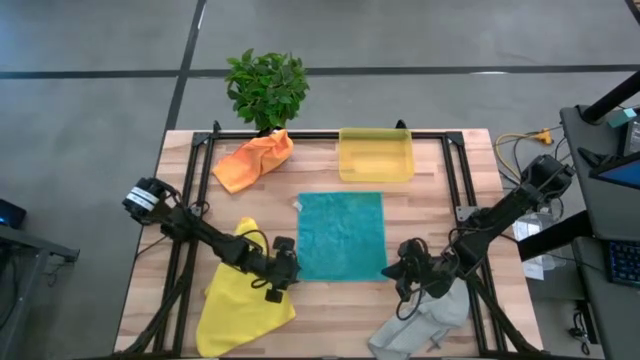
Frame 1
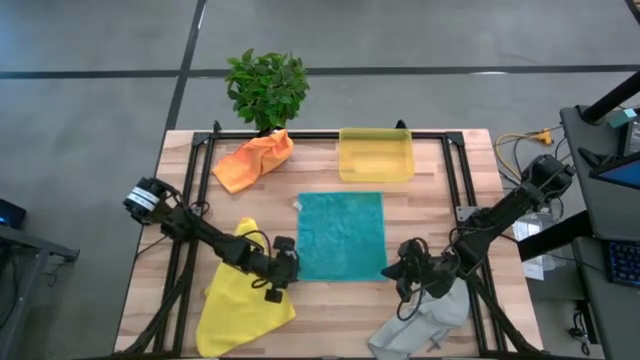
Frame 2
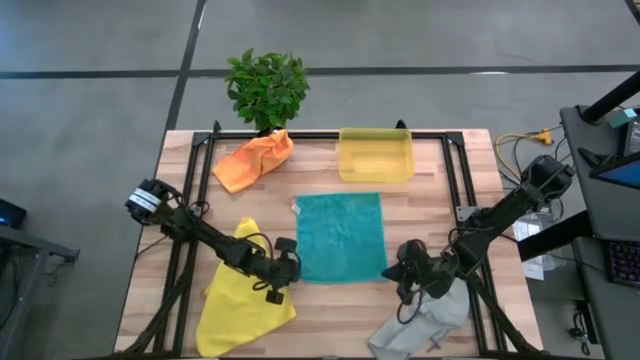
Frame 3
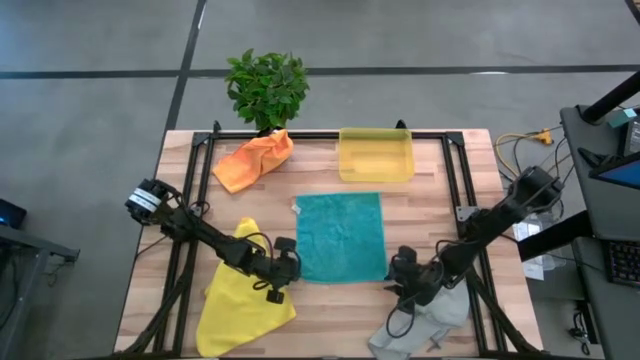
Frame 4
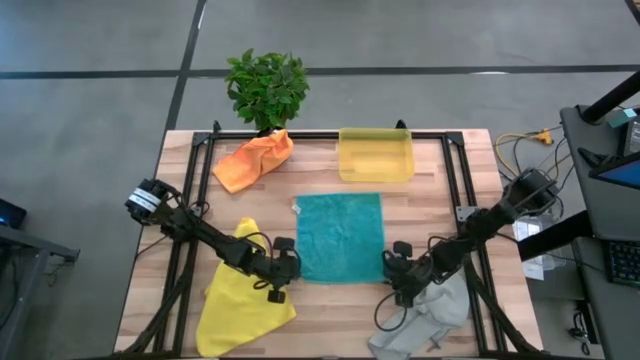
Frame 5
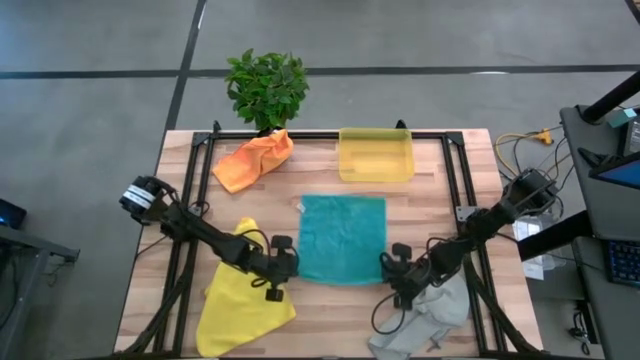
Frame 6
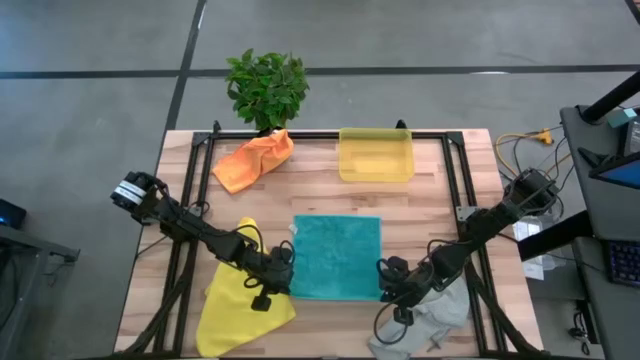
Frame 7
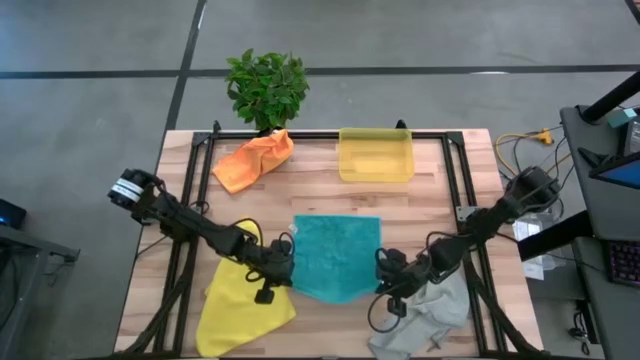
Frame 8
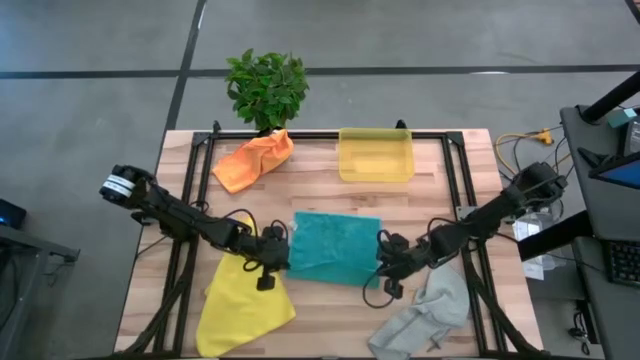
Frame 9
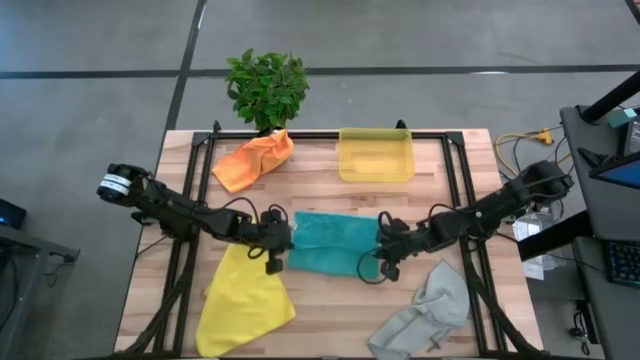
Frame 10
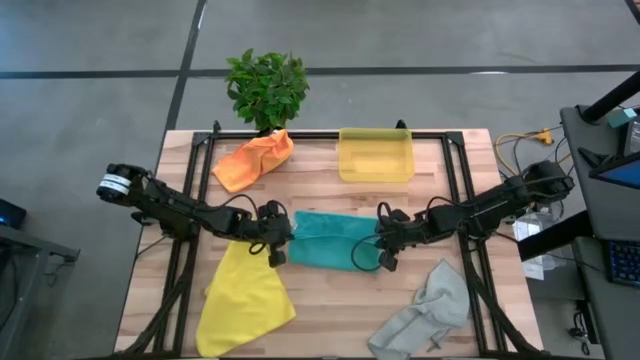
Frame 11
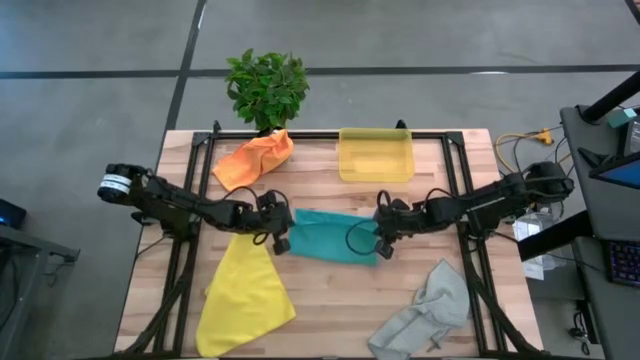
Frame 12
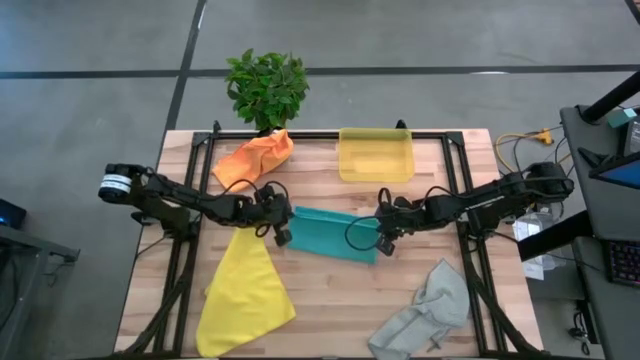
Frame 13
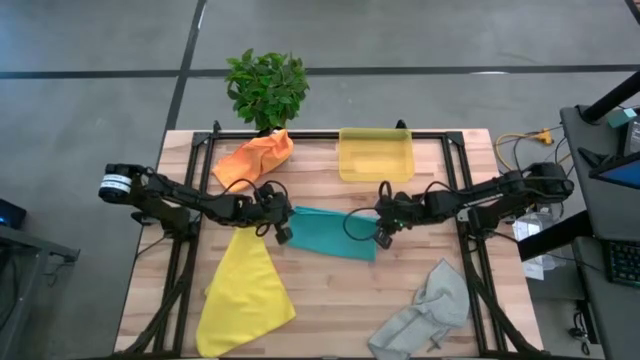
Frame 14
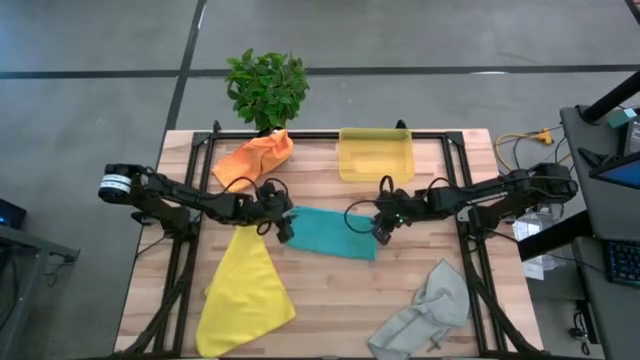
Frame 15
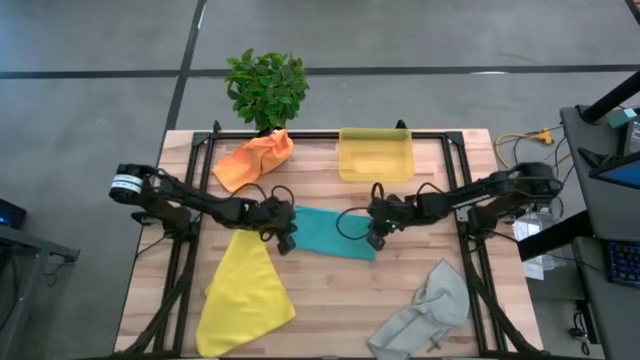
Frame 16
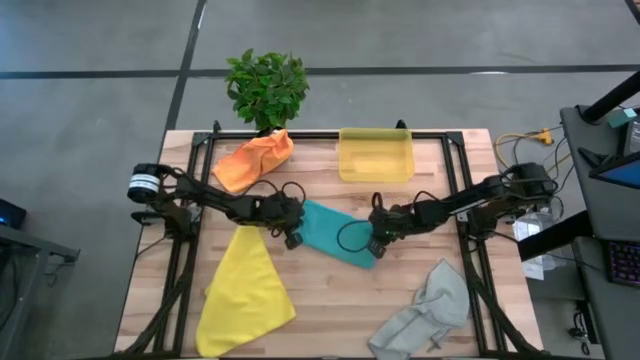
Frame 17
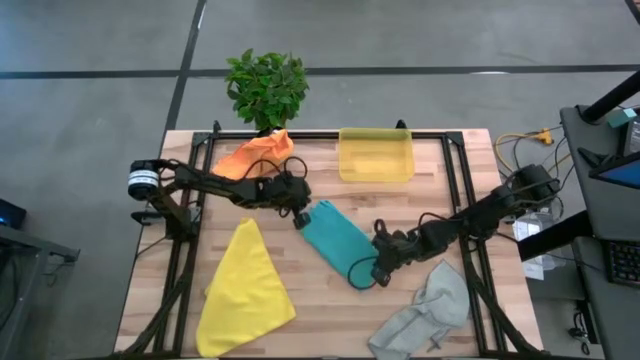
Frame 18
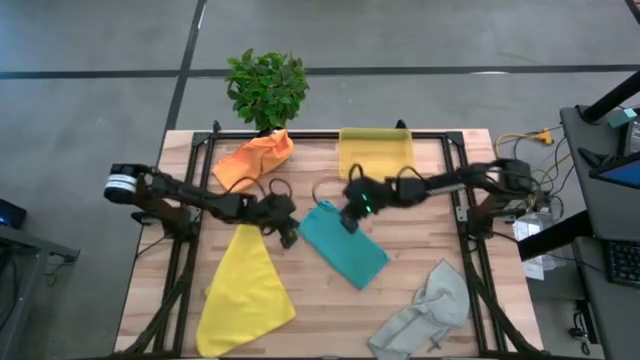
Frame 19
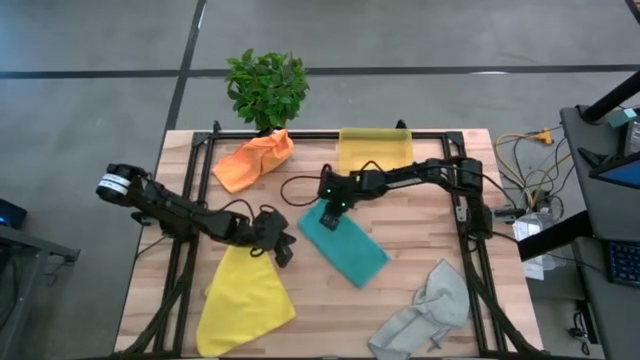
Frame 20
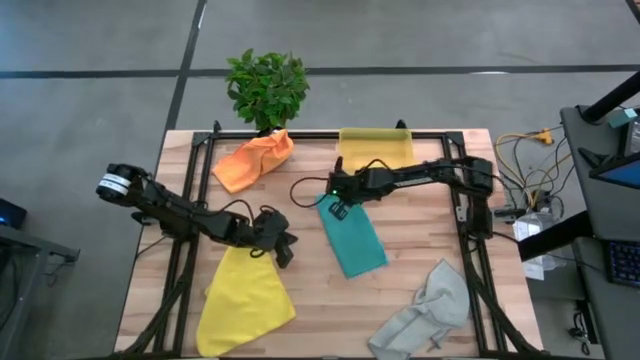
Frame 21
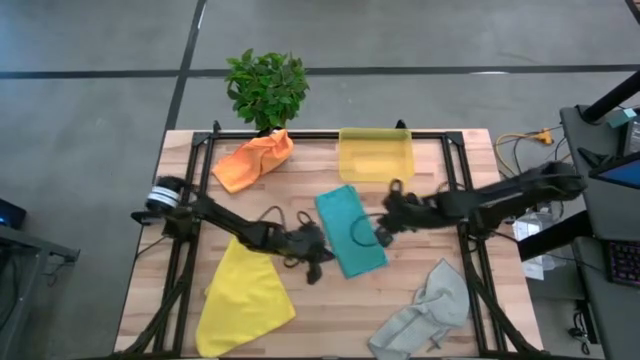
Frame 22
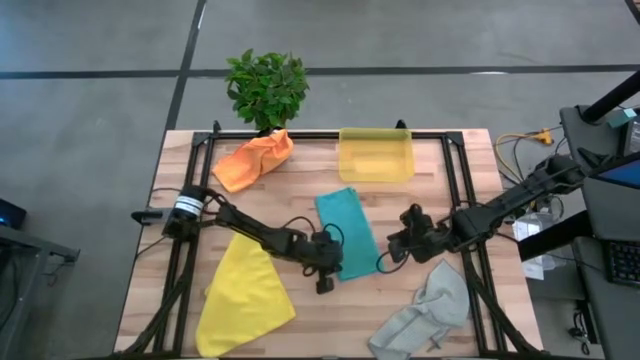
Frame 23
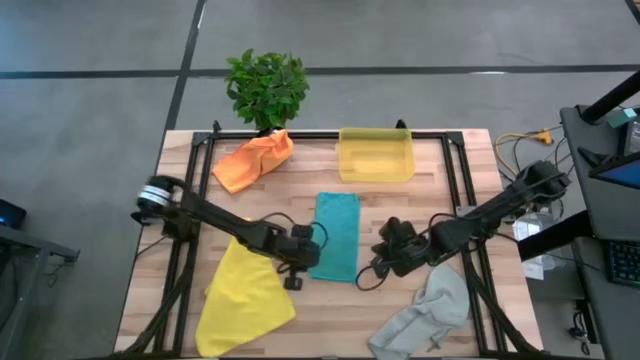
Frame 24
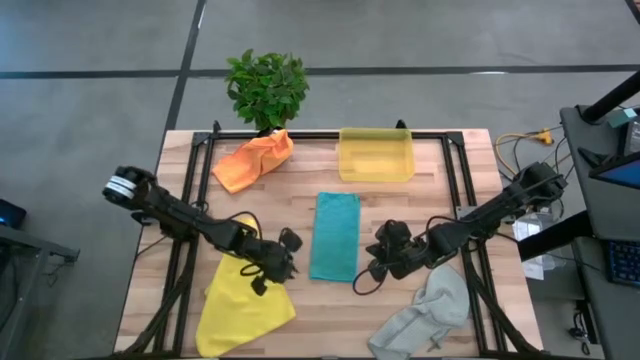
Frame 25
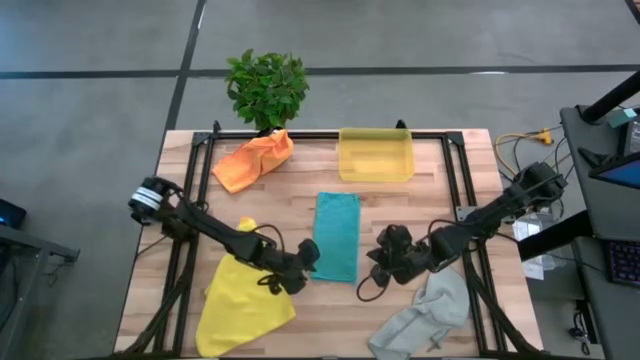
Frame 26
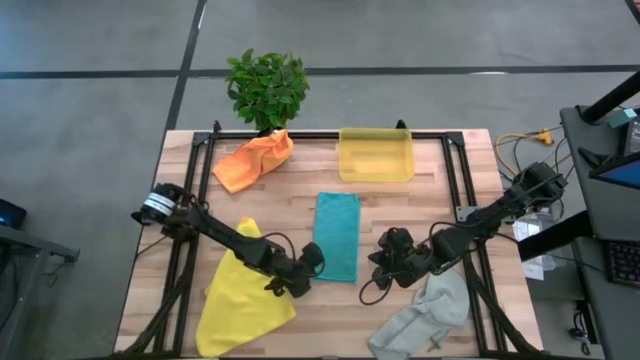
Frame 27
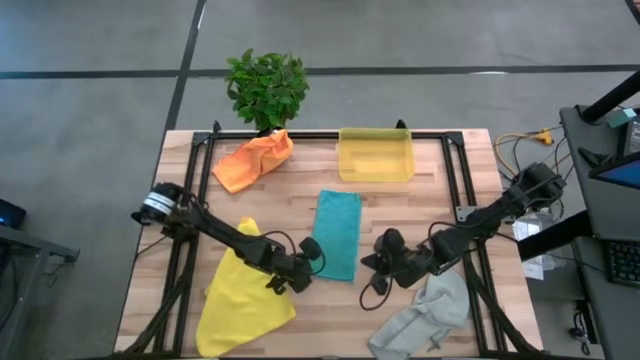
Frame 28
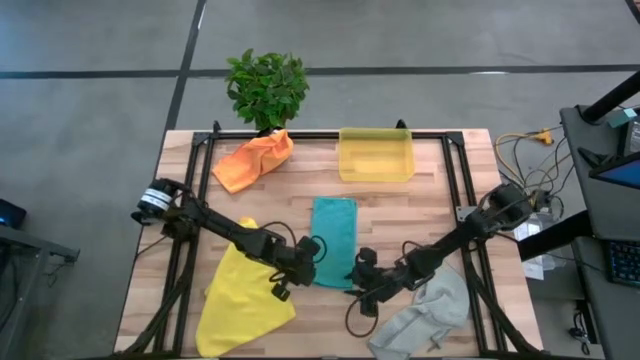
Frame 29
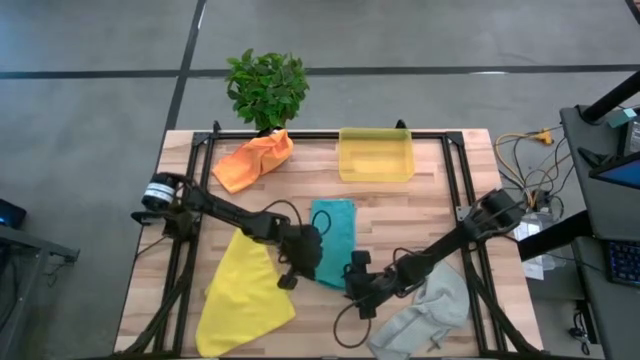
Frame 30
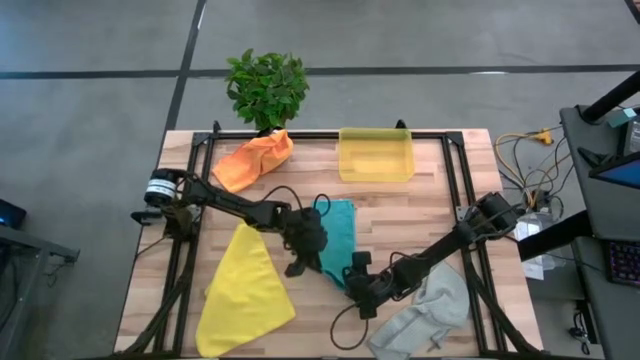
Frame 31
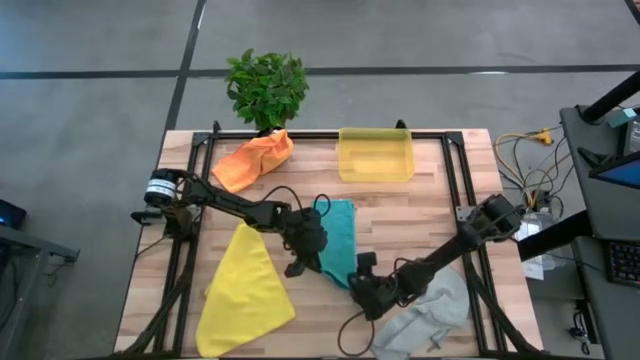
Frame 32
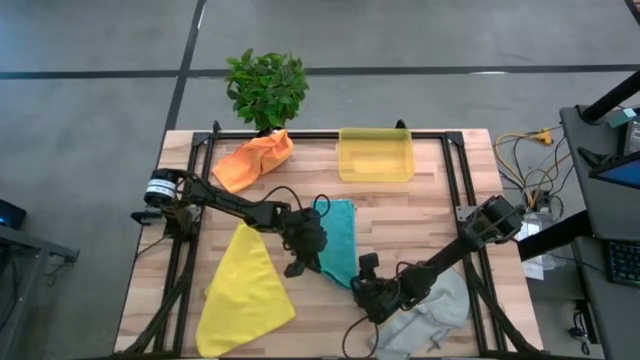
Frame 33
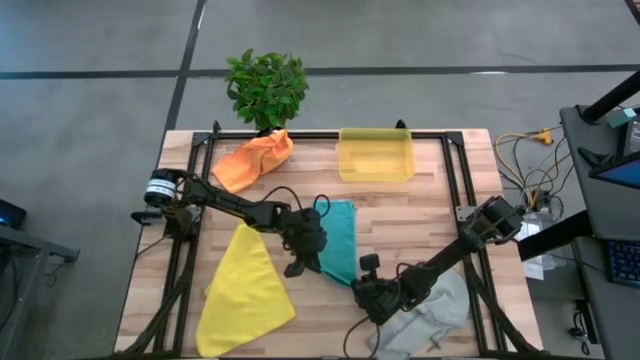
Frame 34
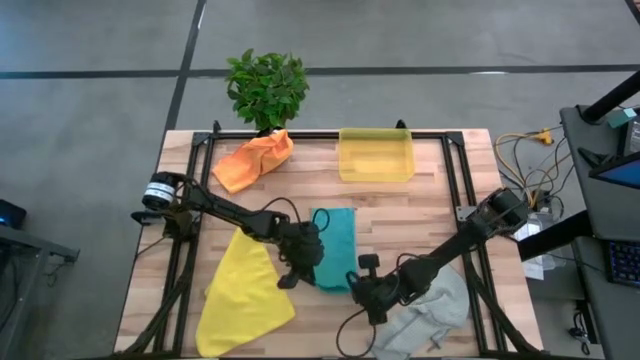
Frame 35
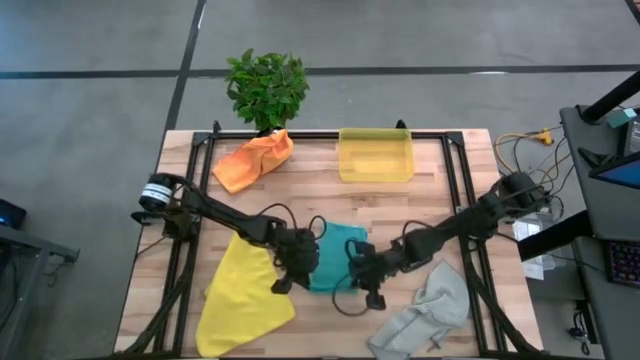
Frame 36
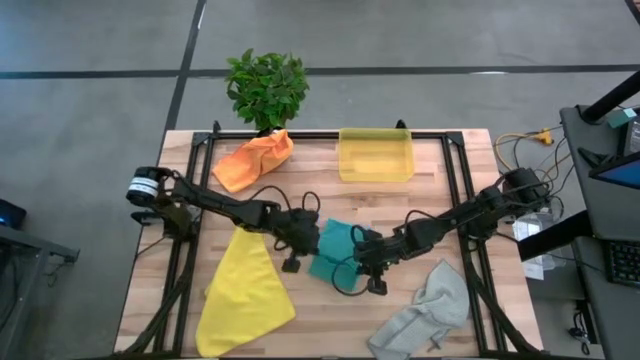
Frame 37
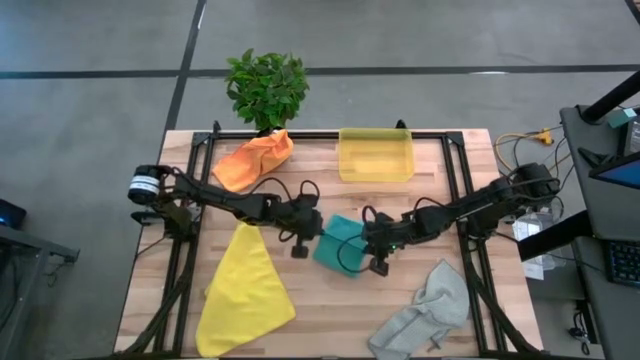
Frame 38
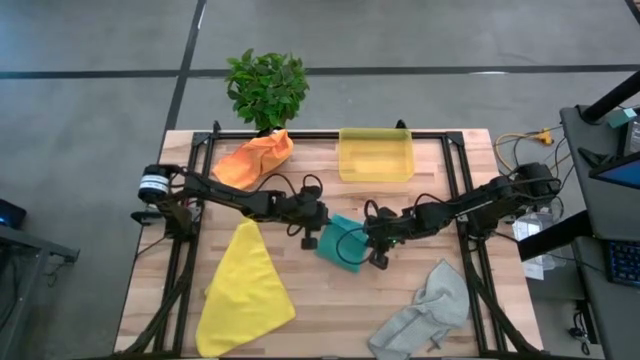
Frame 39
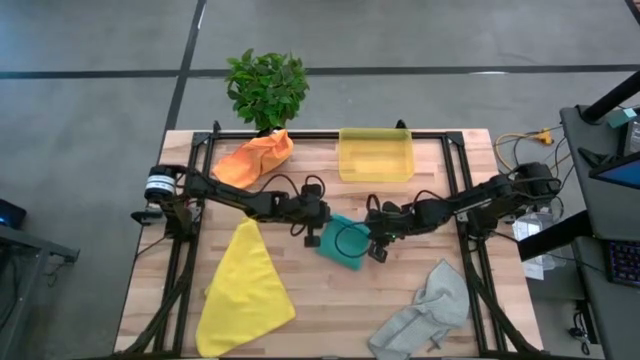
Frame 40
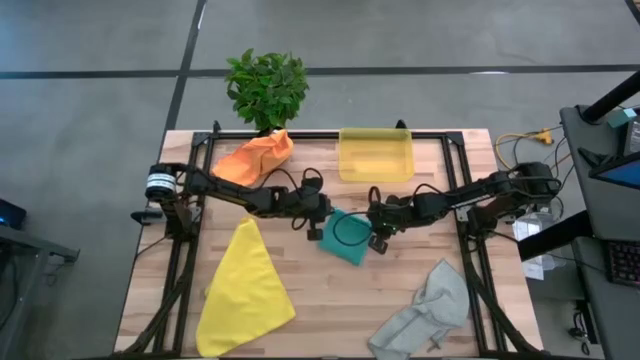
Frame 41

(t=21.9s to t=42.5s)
Task: Fold microfiber towels
Fold the blue microfiber towel
